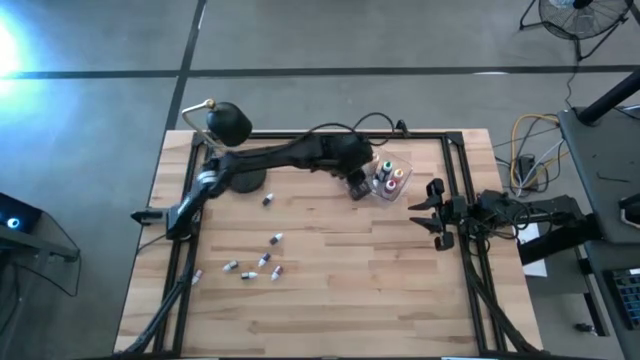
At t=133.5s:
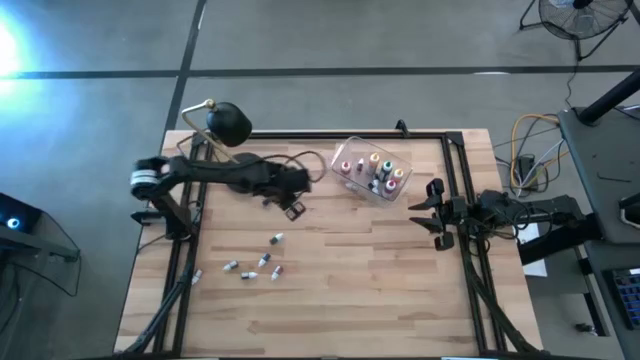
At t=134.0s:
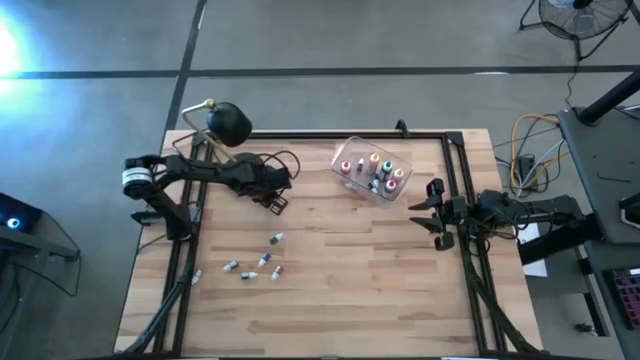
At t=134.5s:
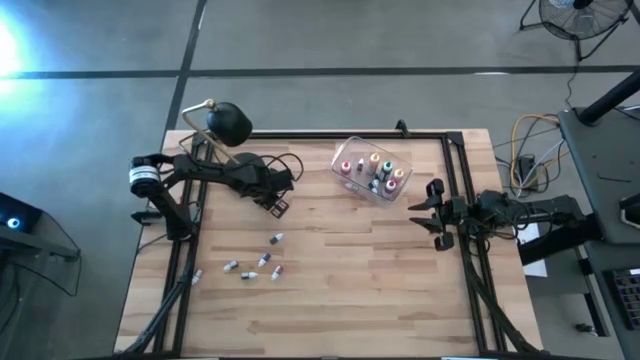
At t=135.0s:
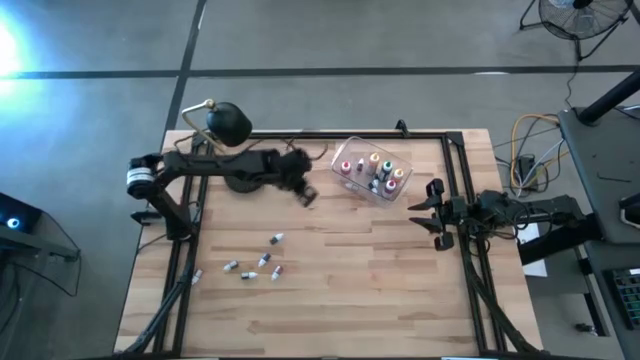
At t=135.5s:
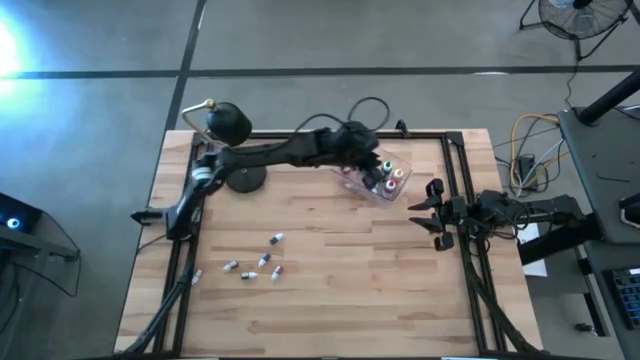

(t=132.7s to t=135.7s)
Task: Pick & Place food coloring
Put the small top blue food coloring bottle into the transparent bin

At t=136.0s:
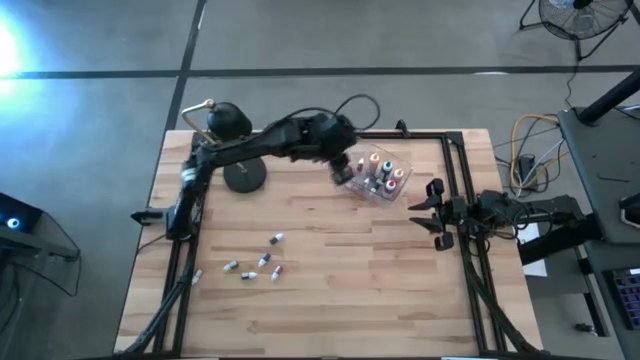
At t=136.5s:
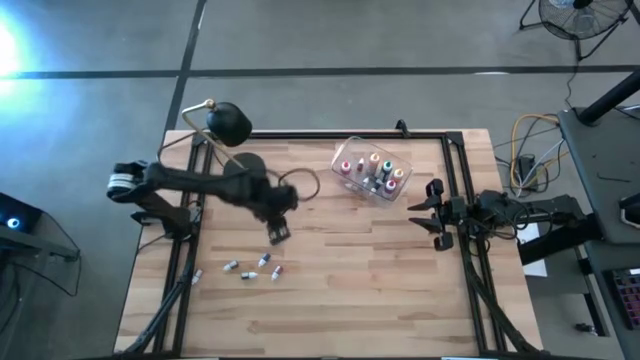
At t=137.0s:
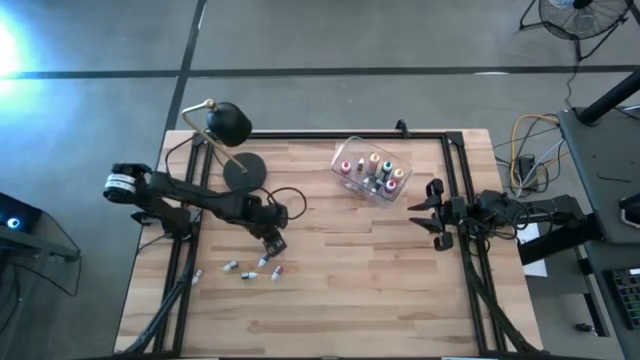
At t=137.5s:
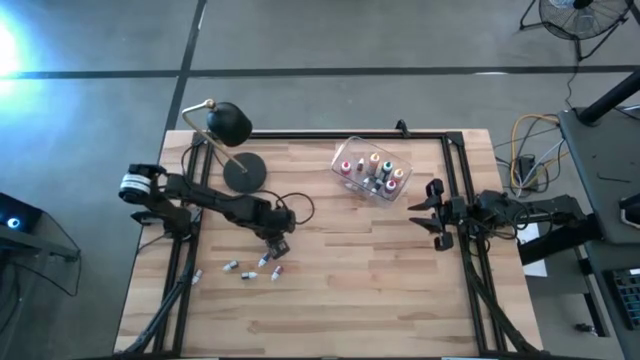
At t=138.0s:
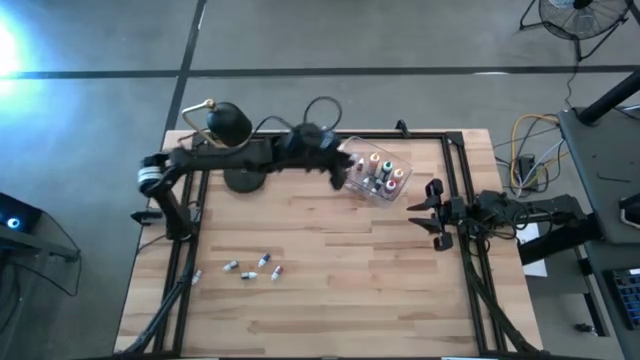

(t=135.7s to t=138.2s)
Put the small right green food coloring bottle into the transparent bin

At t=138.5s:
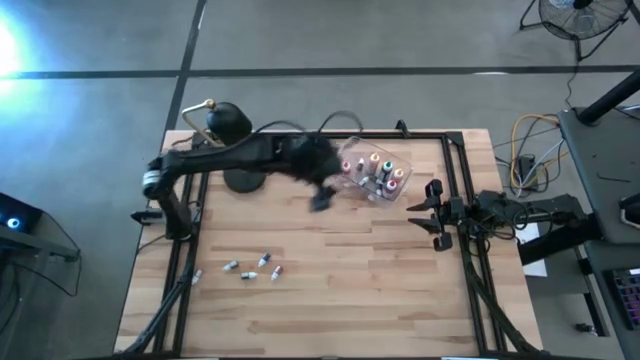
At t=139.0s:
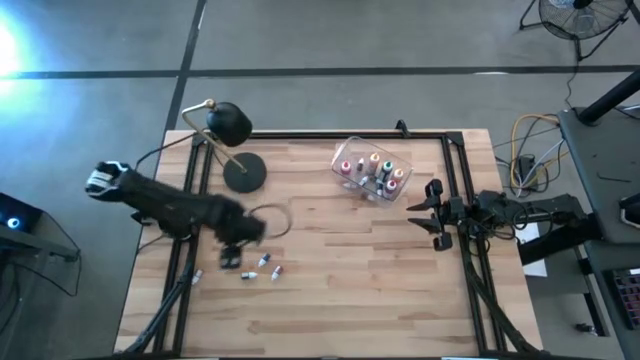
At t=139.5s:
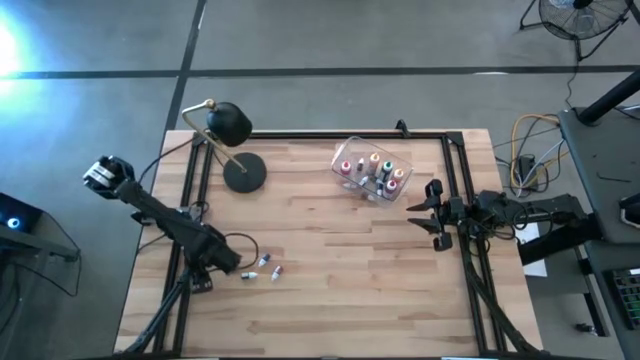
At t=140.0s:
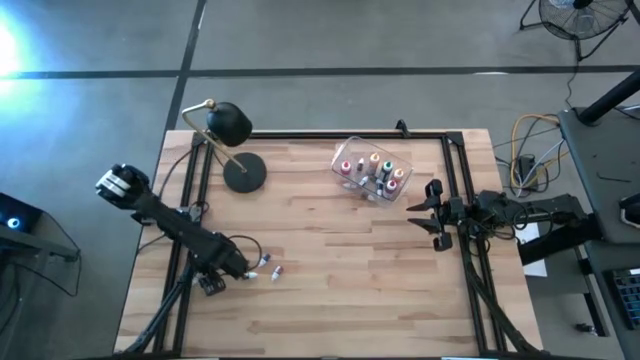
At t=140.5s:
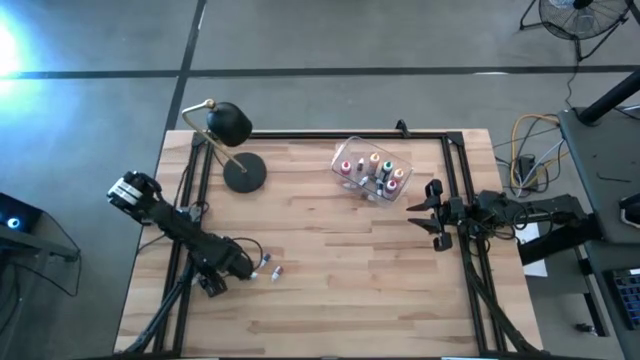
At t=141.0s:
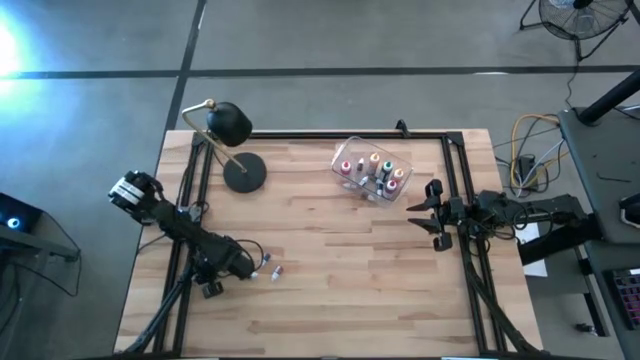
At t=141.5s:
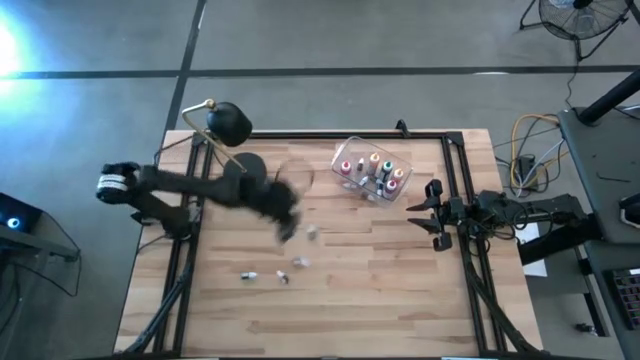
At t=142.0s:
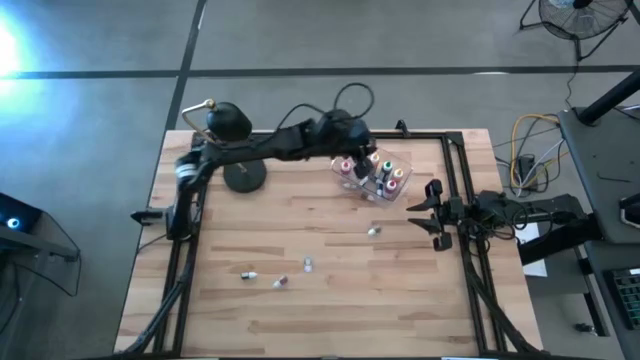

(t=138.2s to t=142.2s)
Put the small pink food coloring bottle into the transparent bin

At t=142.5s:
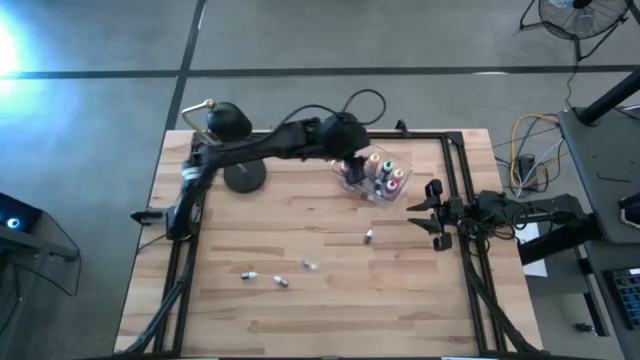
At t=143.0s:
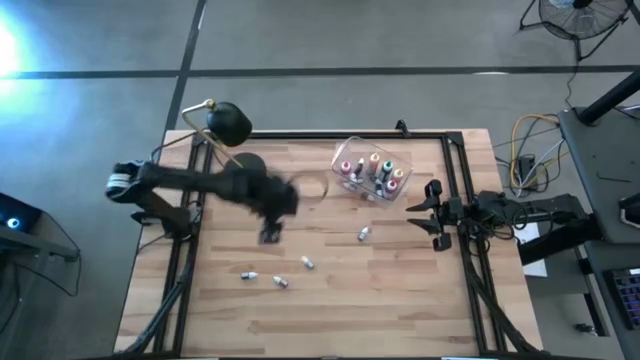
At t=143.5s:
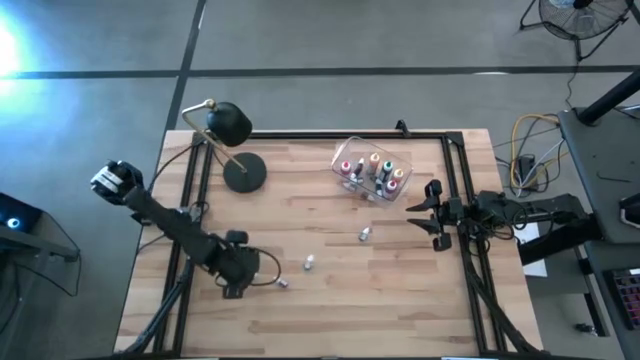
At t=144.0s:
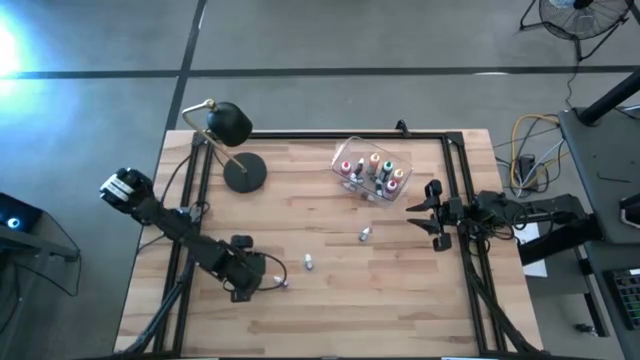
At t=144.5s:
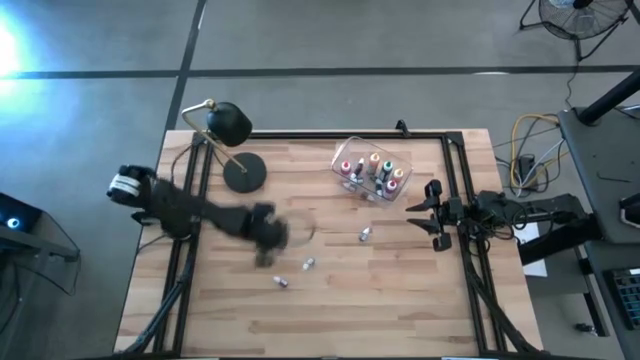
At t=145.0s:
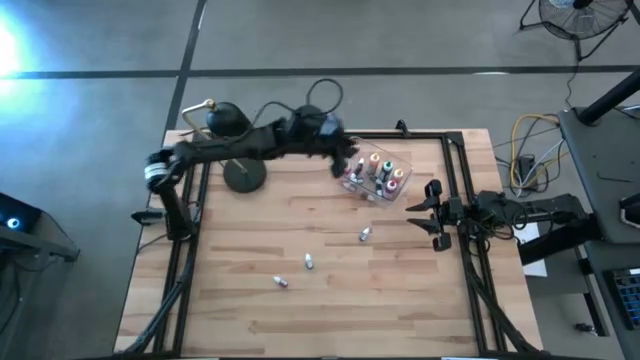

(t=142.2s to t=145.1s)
Put the small black food coloring bottle into the transparent bin

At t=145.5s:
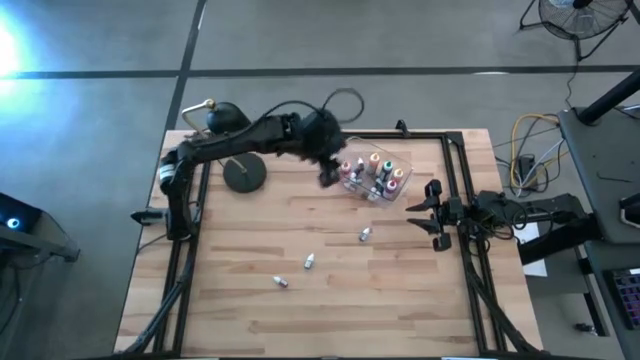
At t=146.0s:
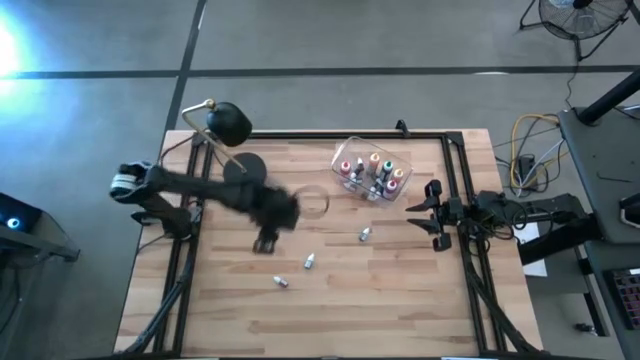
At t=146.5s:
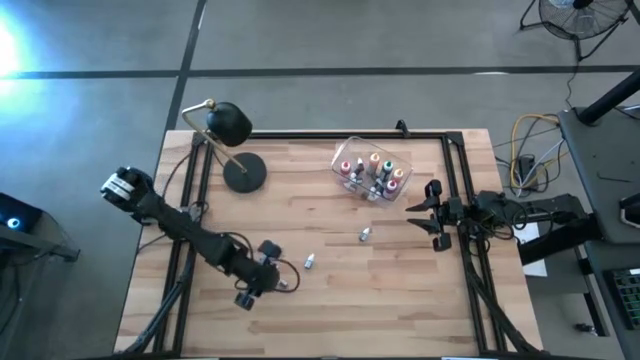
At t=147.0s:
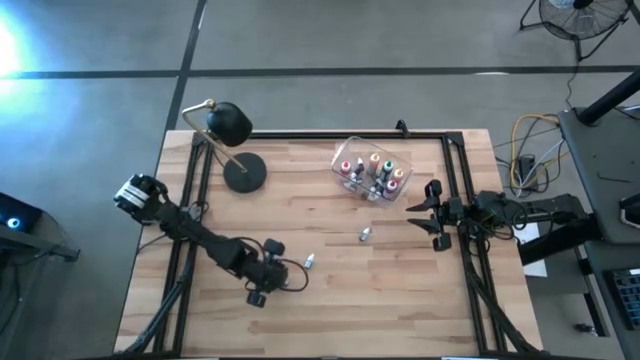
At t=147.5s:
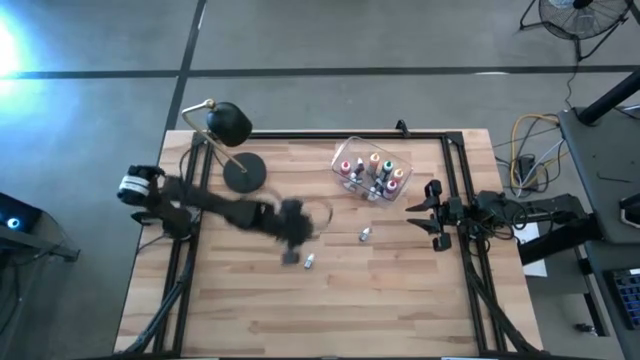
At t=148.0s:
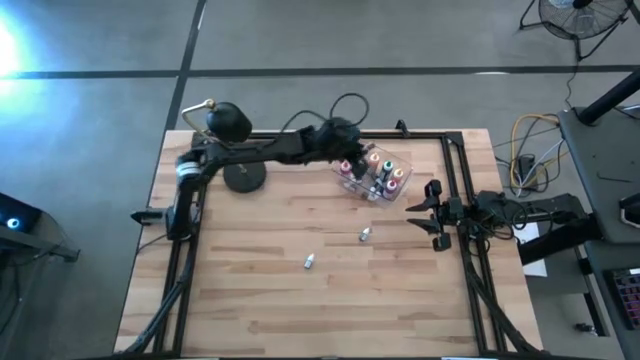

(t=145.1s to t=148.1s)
Put the small red food coloring bottle into the transparent bin

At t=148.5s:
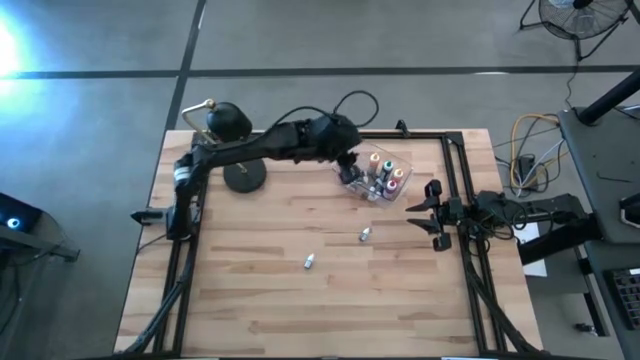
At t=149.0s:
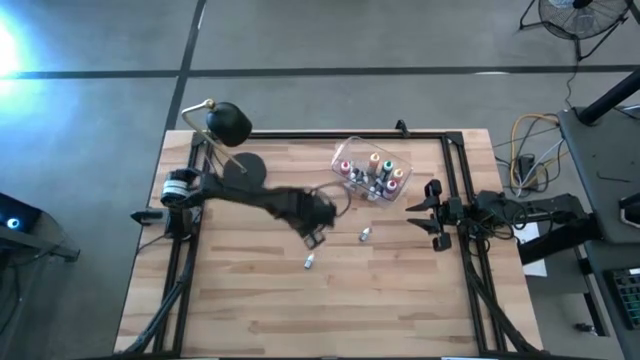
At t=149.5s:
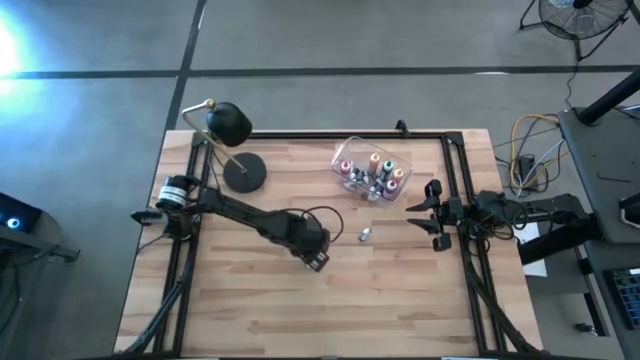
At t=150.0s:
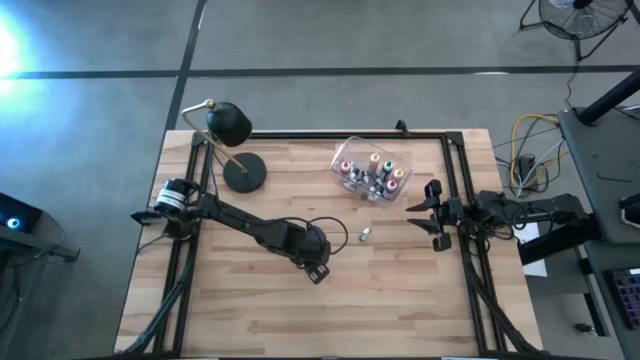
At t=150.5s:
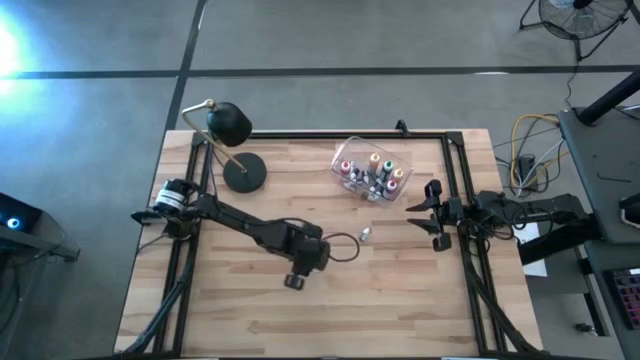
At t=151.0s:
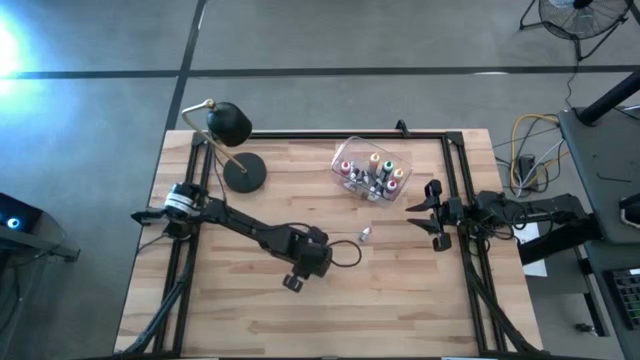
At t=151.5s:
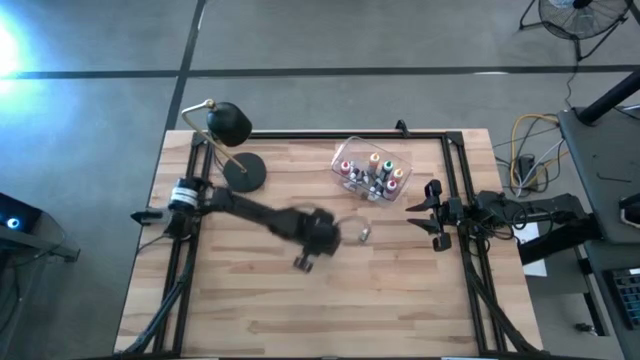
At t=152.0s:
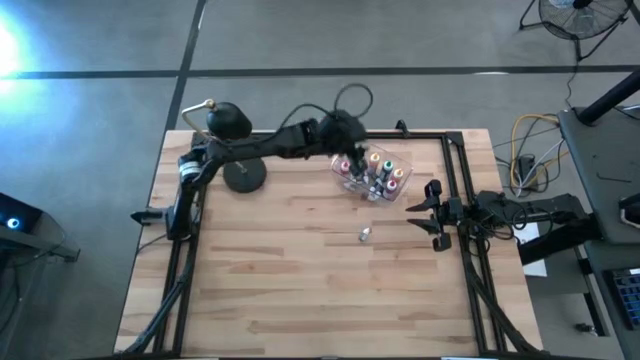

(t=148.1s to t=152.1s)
Put the small blue food coloring bottle into the transparent bin

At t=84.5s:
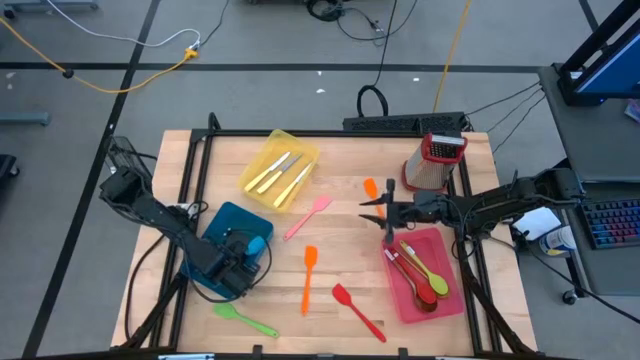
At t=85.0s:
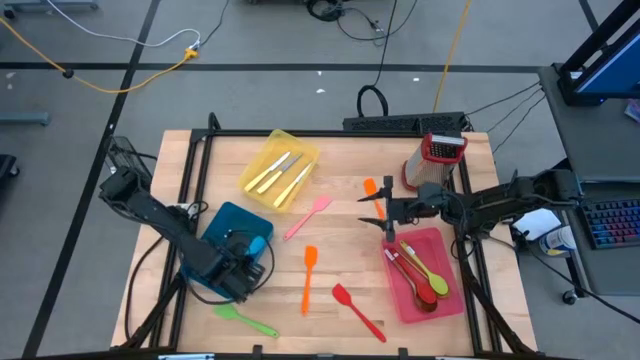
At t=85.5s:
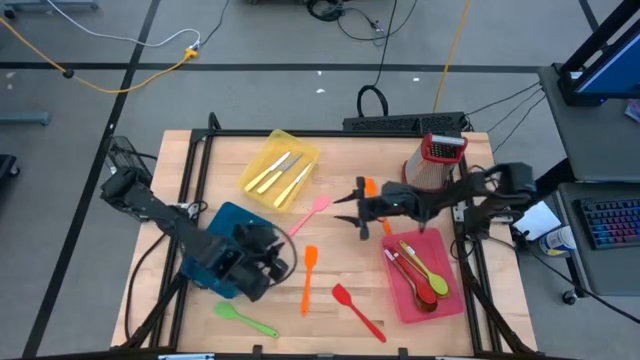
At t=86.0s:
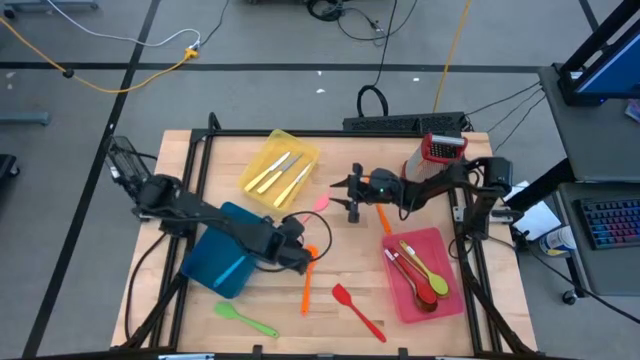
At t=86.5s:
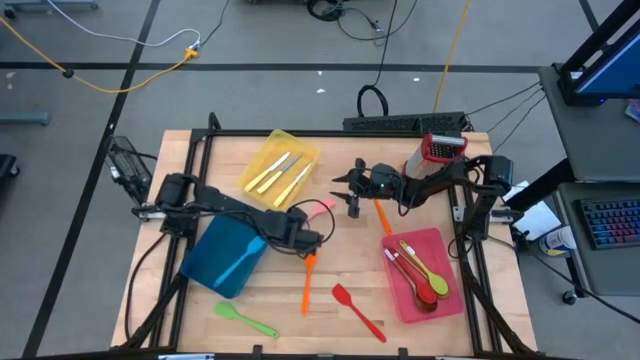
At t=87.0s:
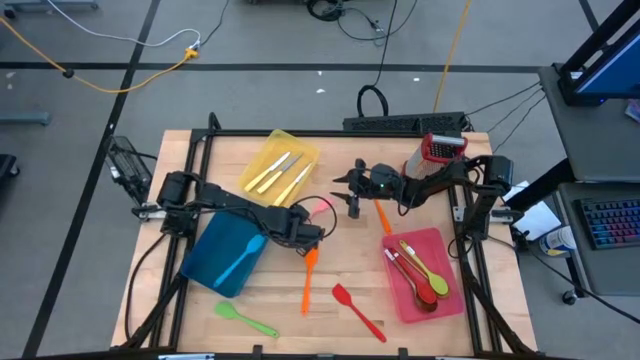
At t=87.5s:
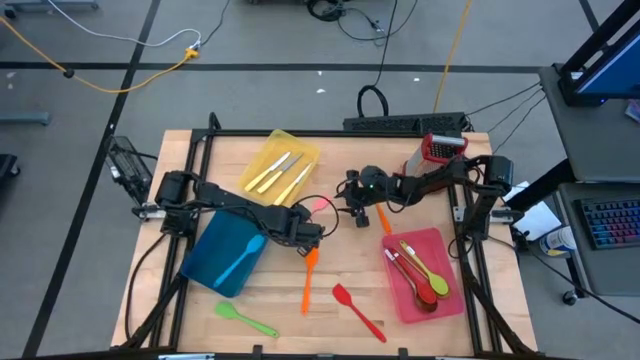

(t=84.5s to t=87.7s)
Task: Pick & Place Kitchen Items
Put the pink spatula into the blue bin
